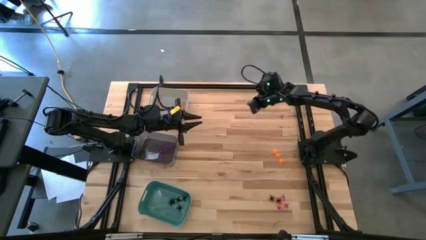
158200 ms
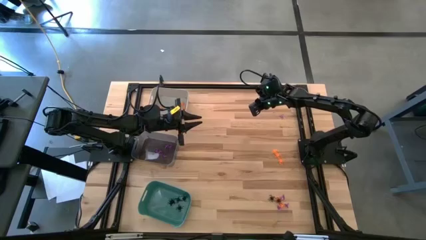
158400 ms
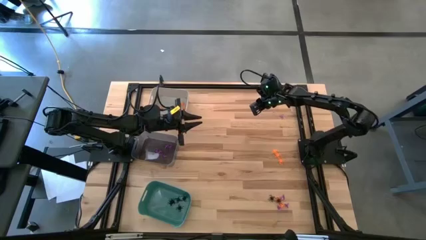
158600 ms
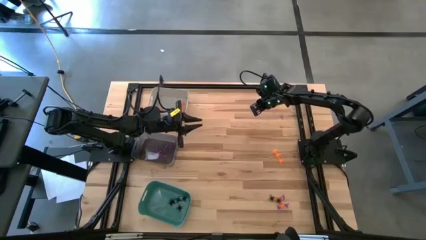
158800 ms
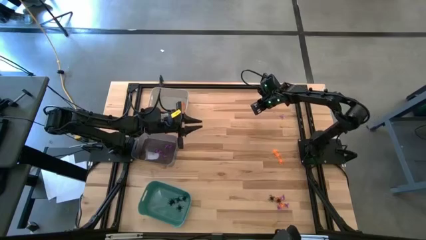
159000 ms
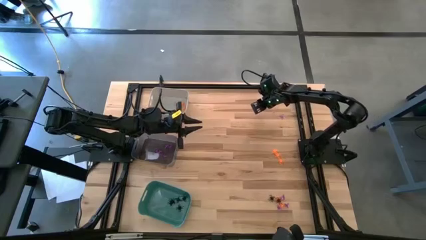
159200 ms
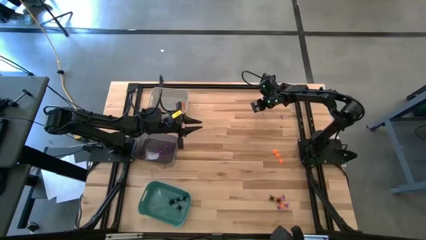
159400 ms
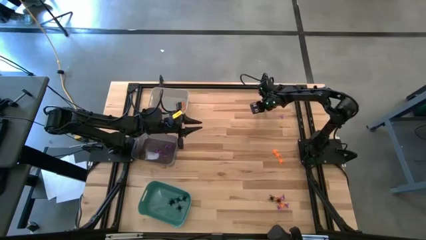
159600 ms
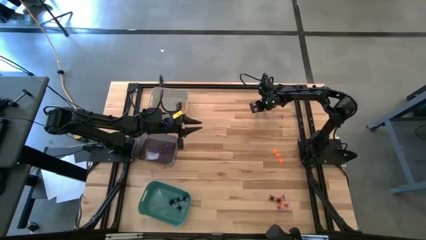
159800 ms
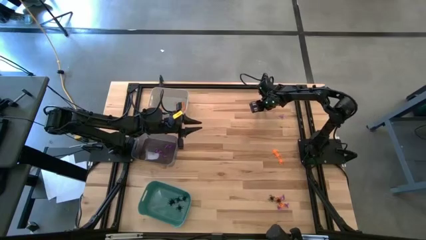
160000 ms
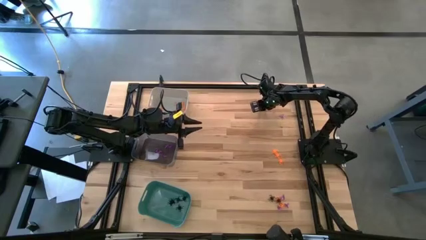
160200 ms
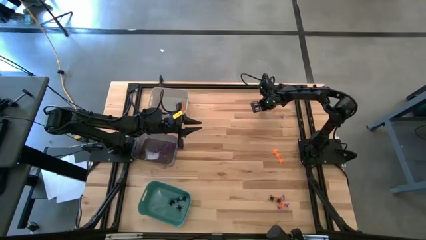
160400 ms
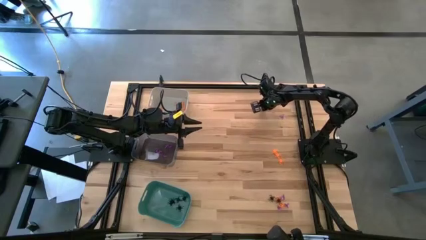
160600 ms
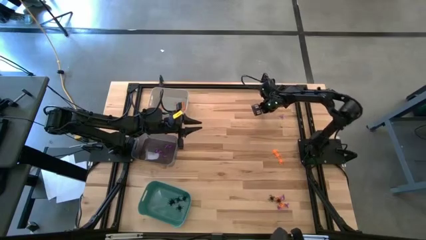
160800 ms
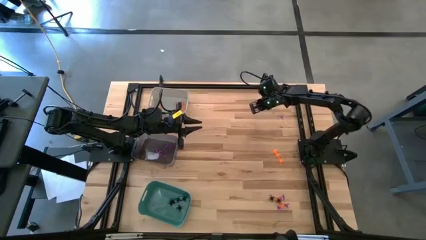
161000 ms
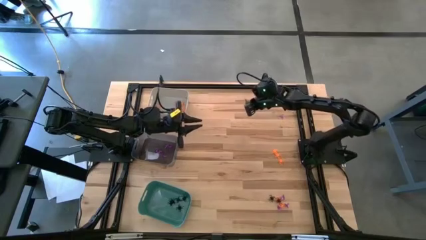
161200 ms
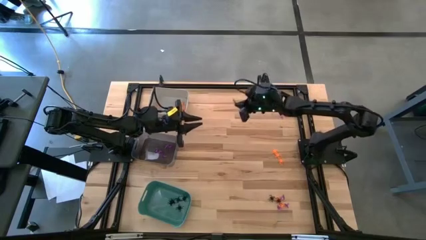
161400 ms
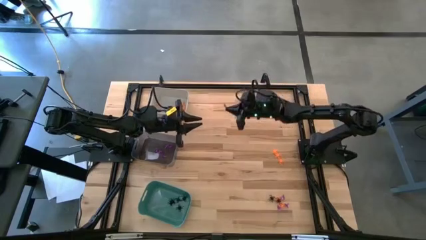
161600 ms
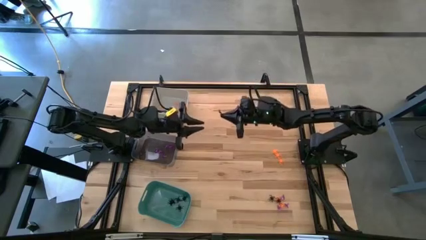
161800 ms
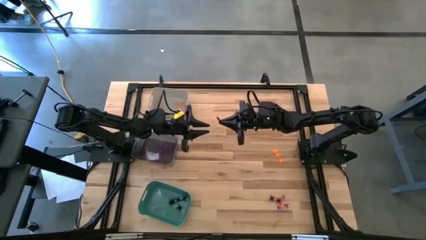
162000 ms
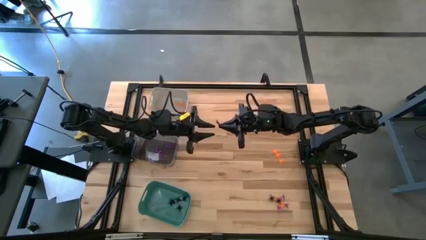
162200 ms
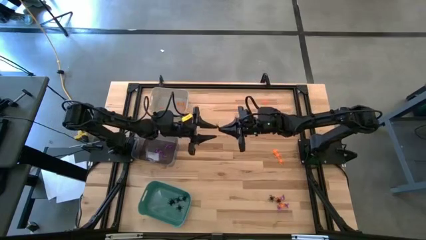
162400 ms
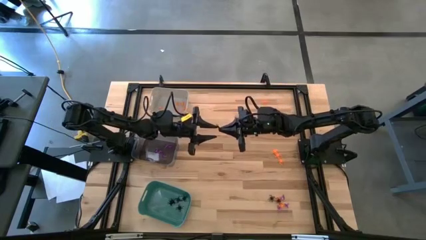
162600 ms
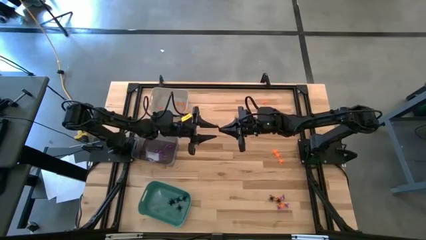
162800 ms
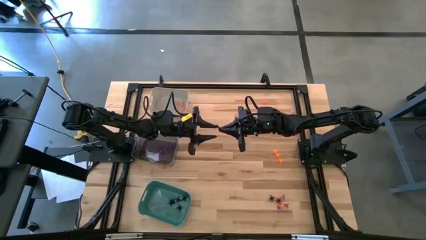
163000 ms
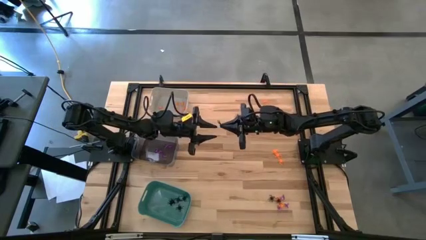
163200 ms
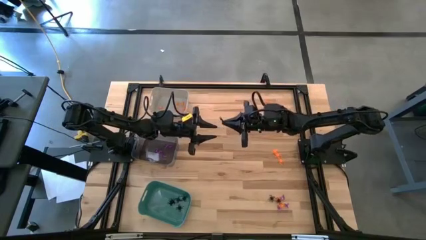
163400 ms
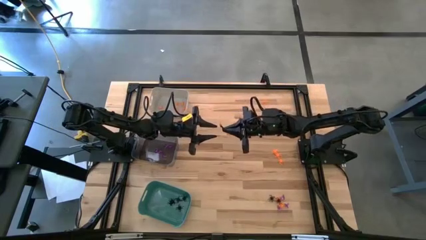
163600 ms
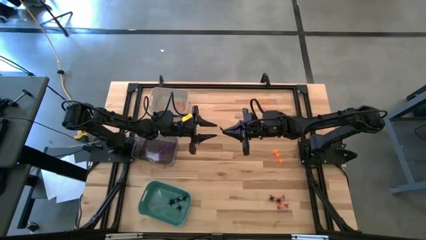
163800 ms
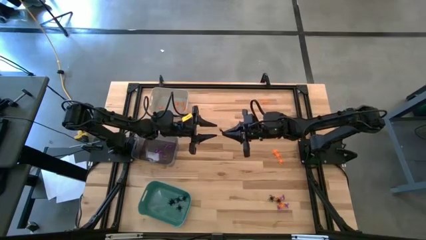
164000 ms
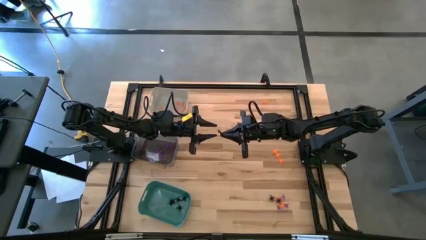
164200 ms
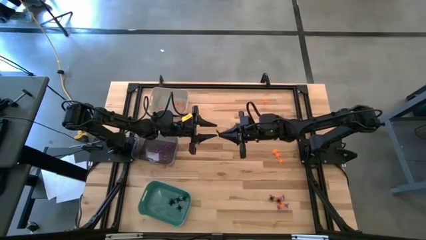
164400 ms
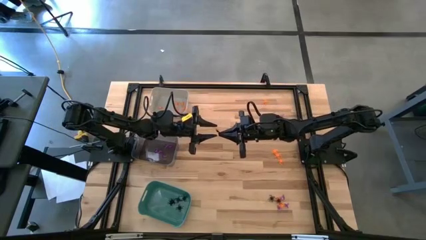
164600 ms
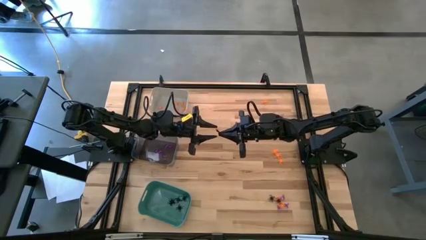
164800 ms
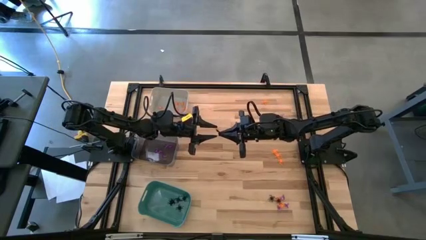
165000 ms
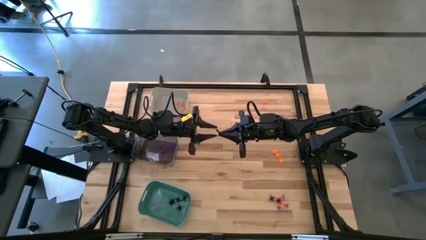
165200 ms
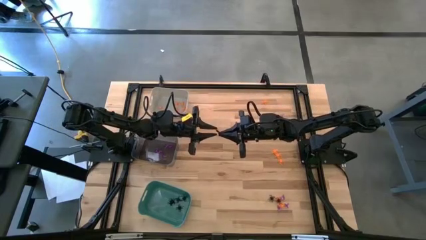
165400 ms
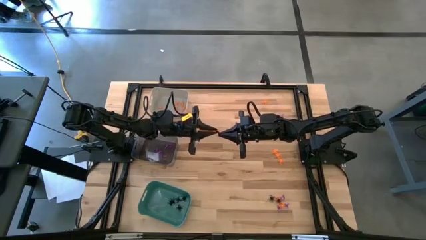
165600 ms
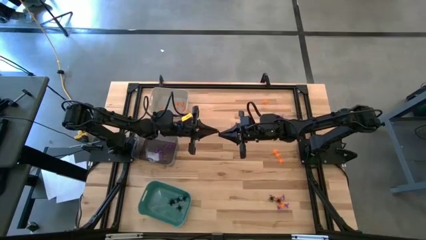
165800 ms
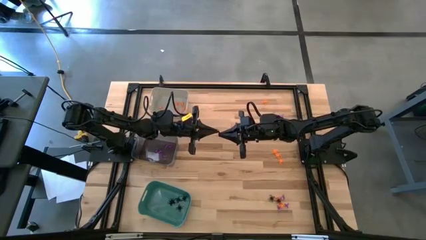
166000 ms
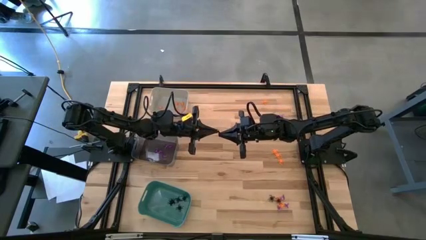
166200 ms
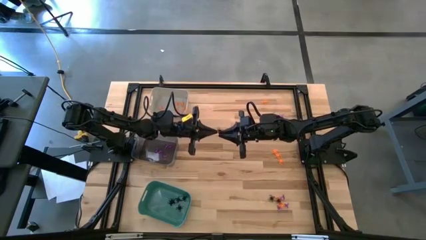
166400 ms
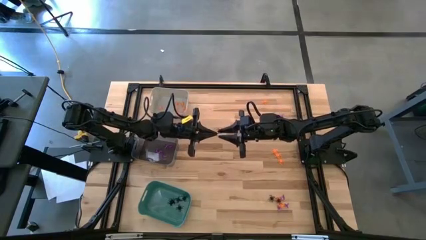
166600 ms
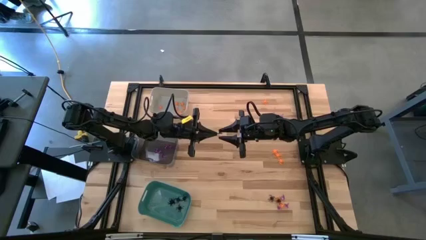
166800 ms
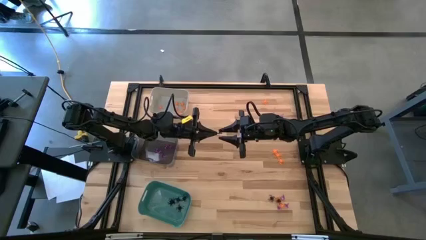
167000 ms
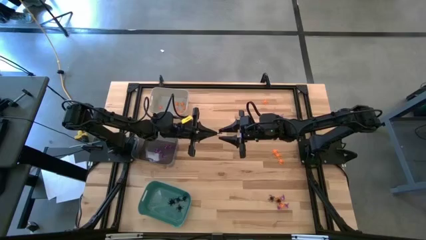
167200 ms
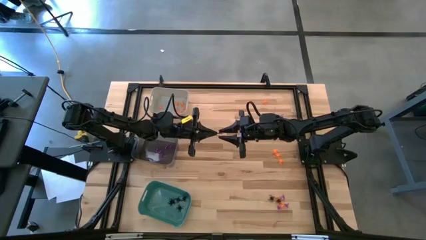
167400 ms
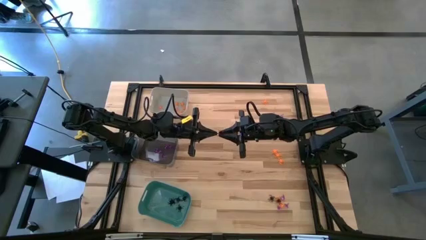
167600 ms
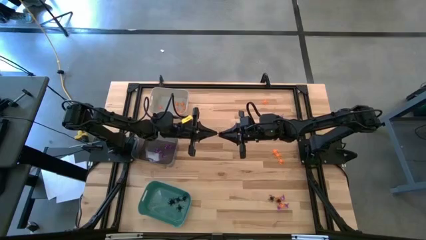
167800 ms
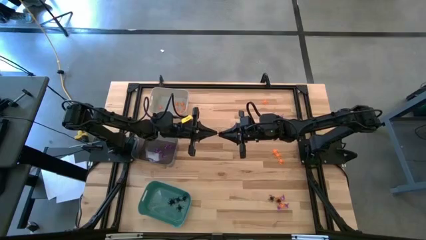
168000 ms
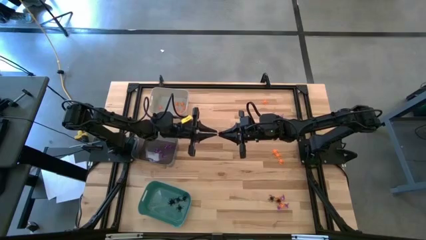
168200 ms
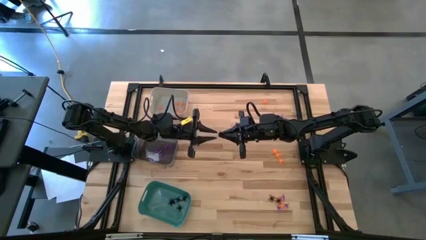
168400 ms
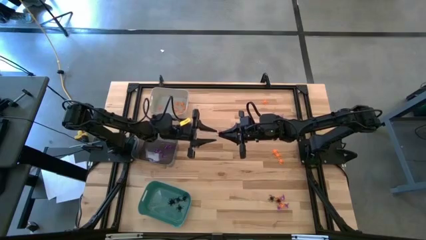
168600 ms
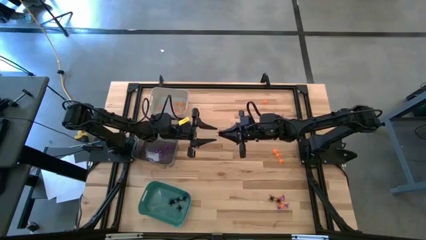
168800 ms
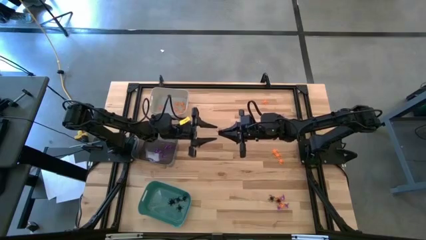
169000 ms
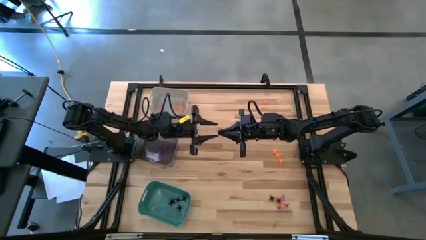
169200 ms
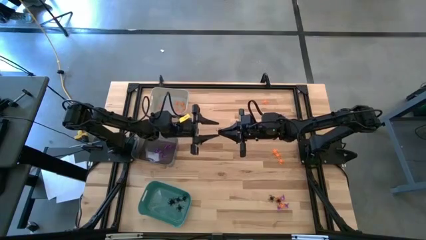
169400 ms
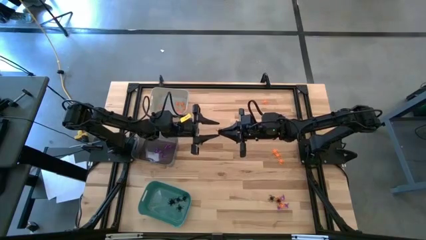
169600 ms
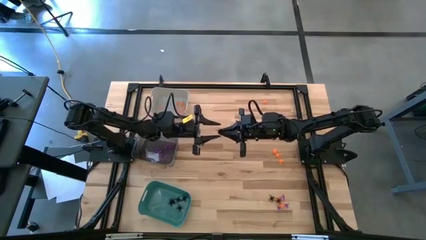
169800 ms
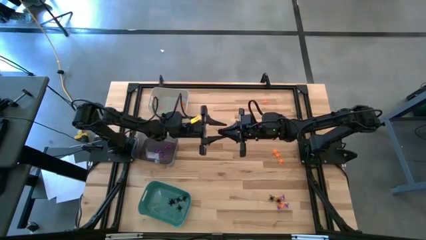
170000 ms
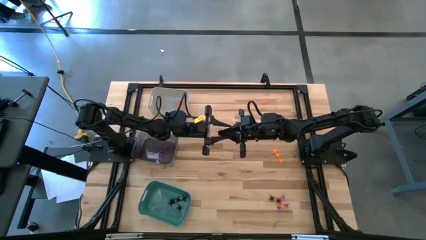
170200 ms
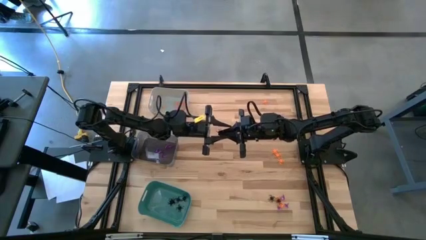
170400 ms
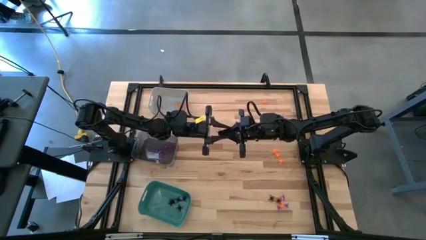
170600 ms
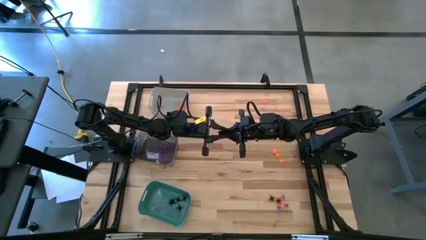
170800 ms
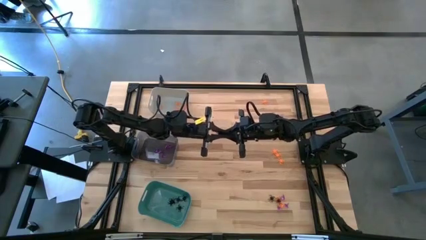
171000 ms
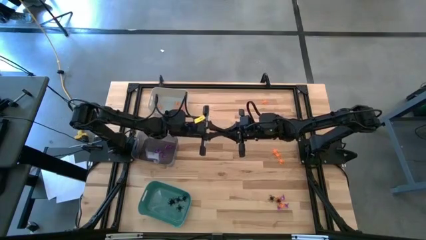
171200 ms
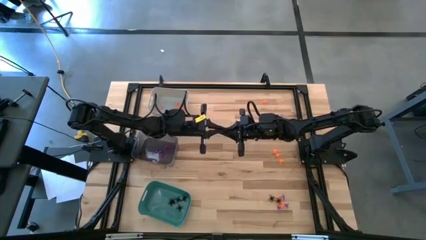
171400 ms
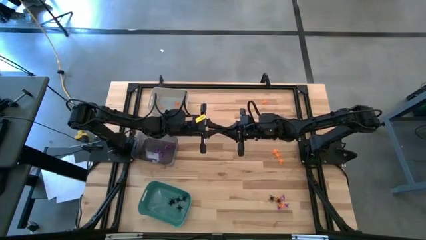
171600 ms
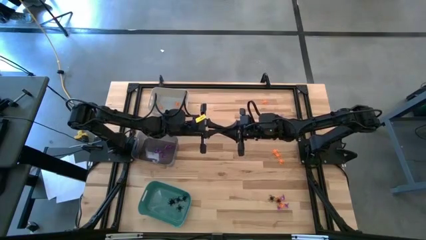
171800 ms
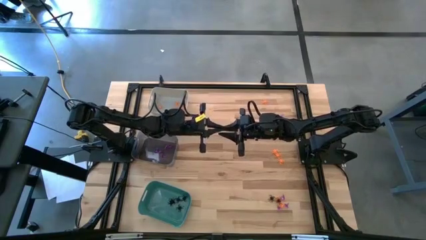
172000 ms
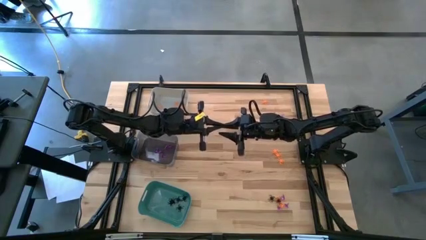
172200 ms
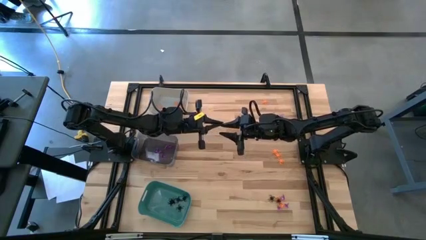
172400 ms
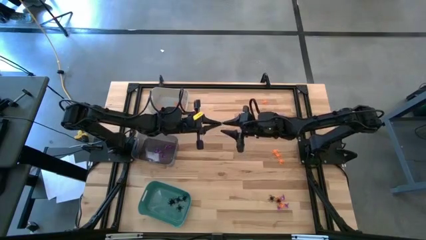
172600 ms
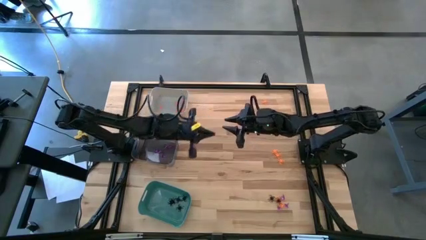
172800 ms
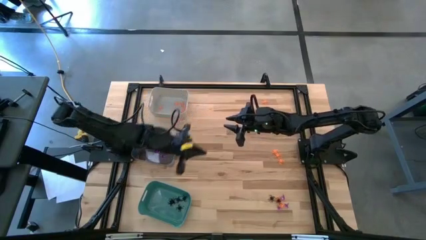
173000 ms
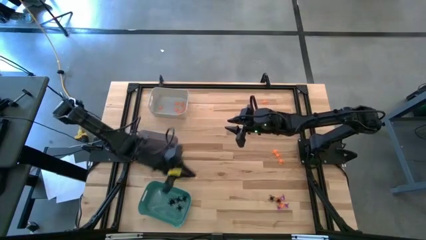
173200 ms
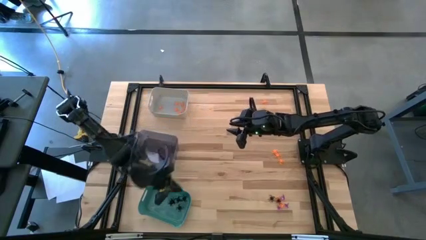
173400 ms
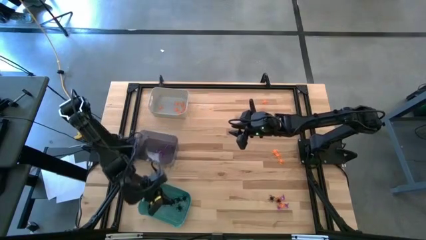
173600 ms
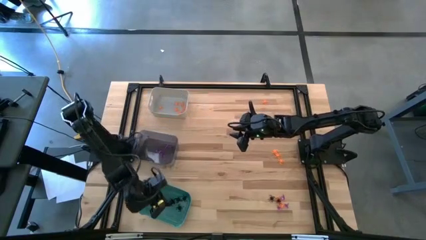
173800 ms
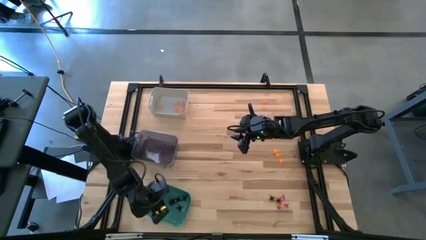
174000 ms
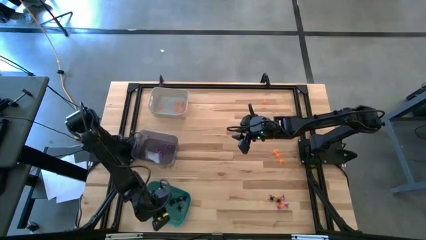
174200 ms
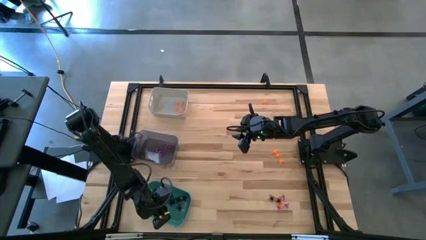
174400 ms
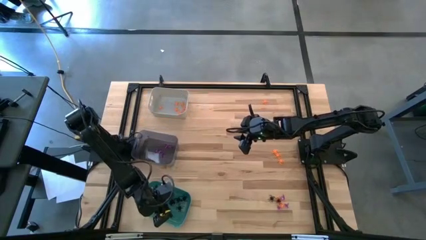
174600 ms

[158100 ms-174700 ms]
Task: Sort Halloween decoration
Put the top right black spider into the green bin
